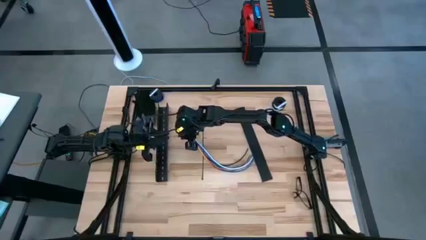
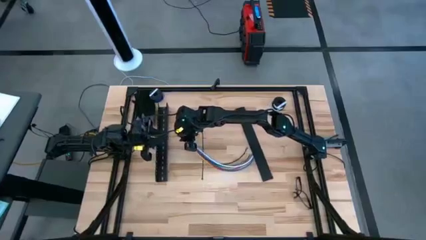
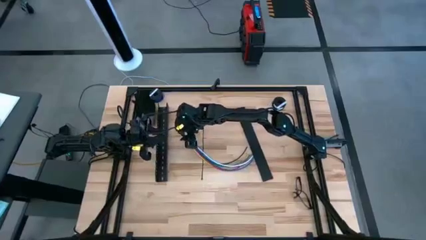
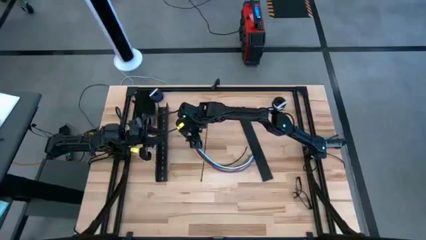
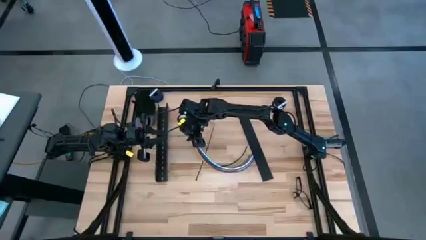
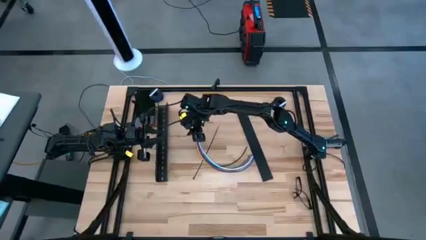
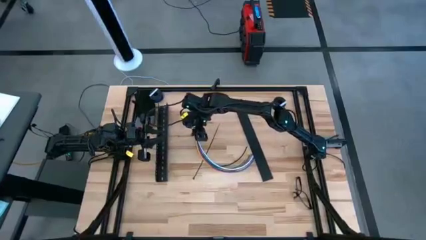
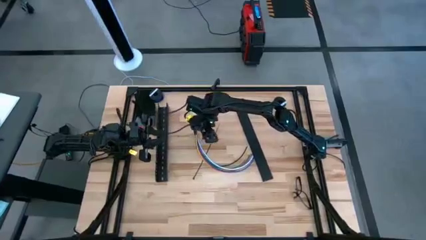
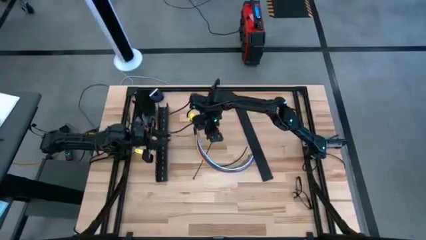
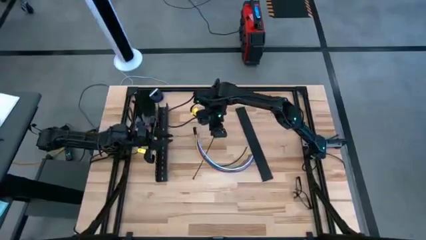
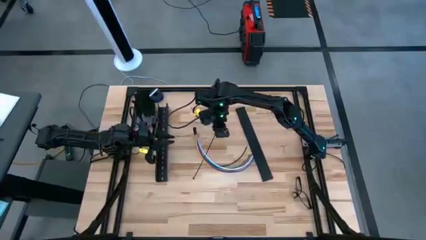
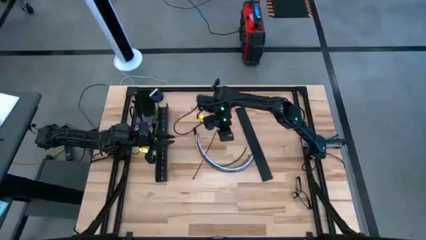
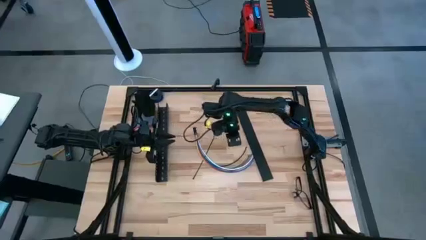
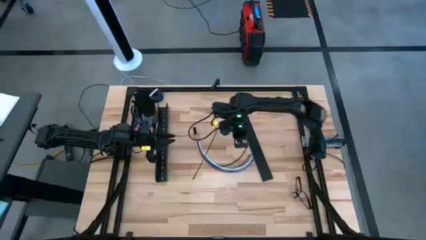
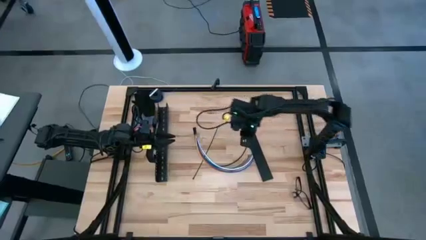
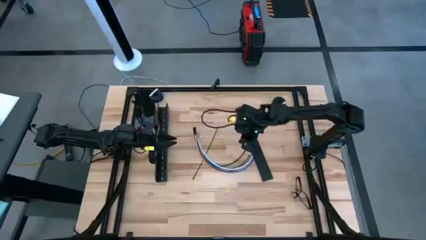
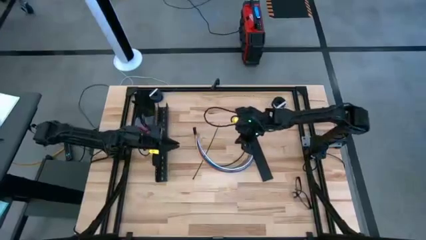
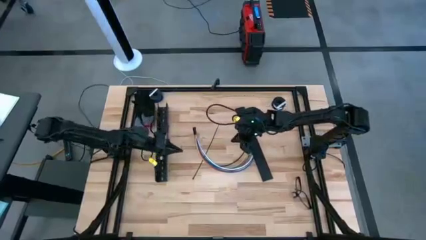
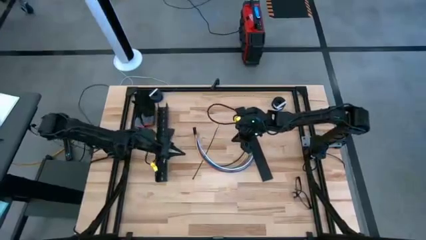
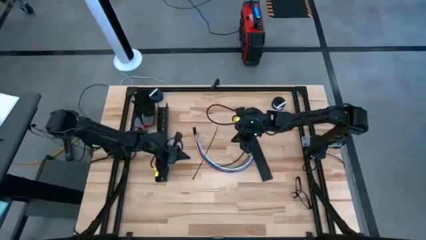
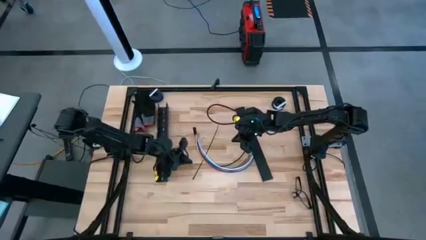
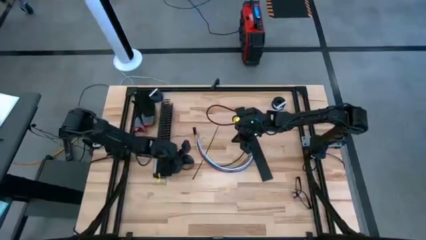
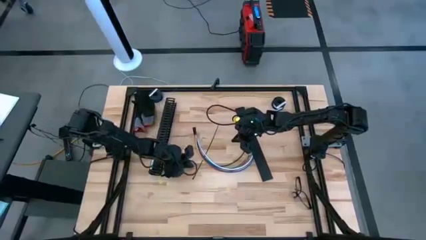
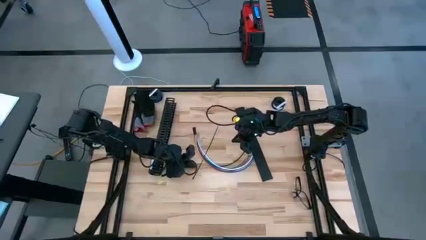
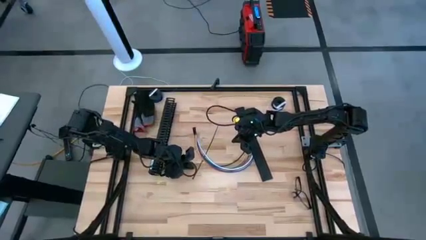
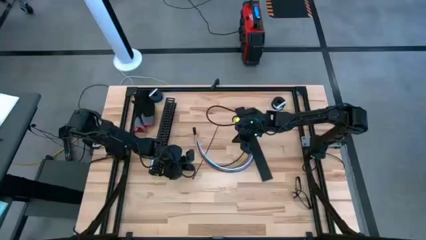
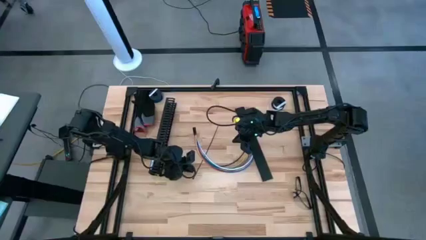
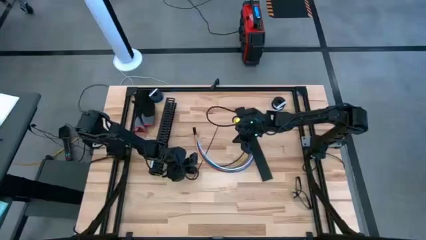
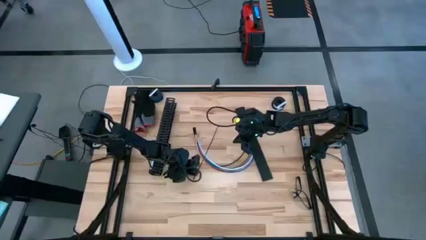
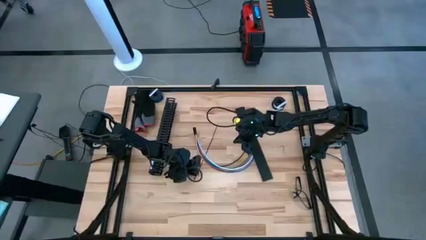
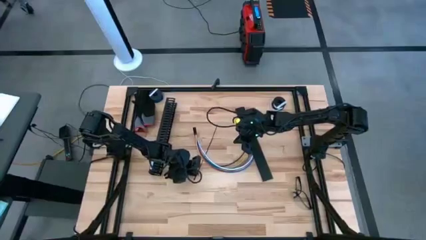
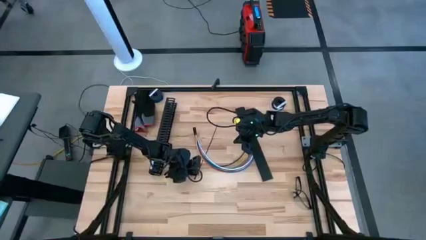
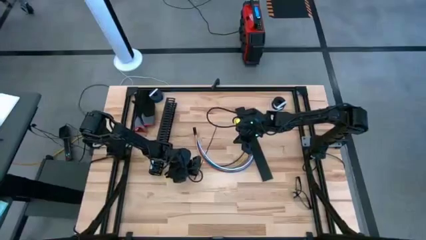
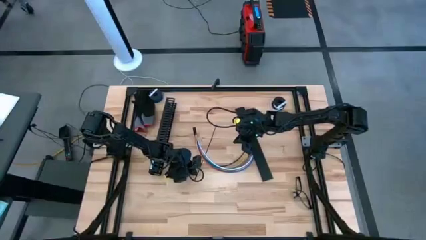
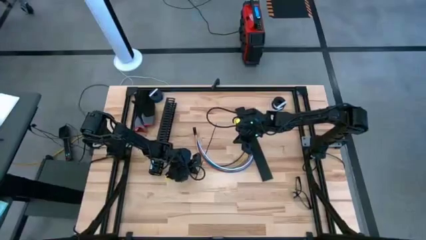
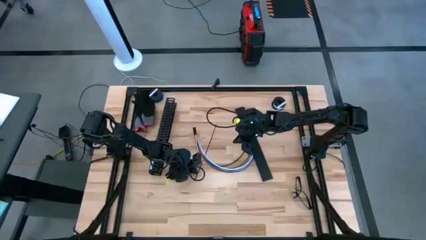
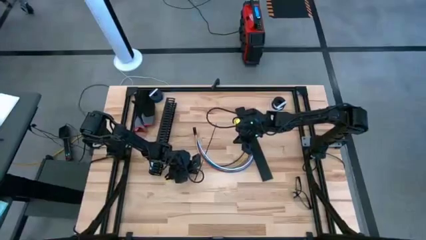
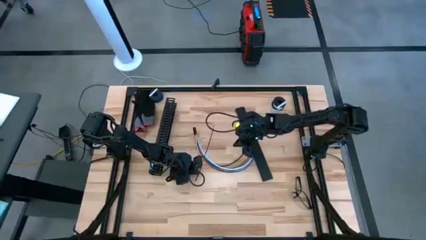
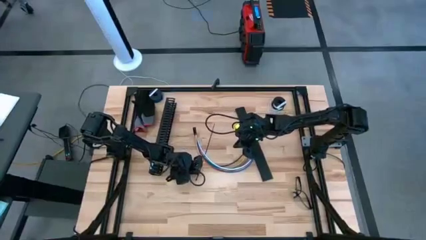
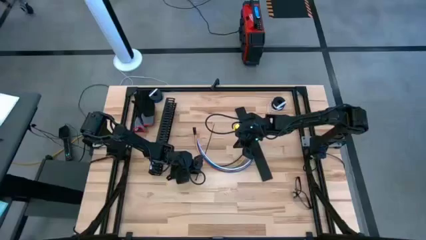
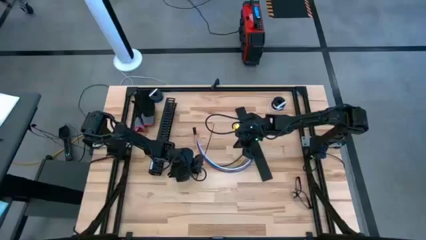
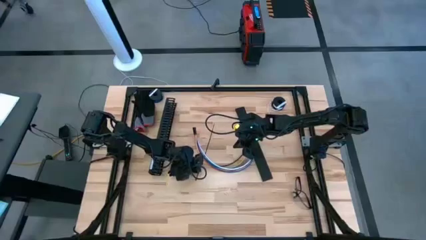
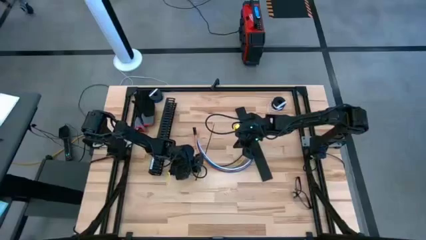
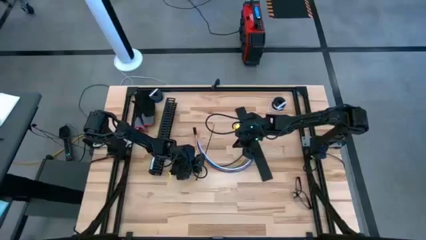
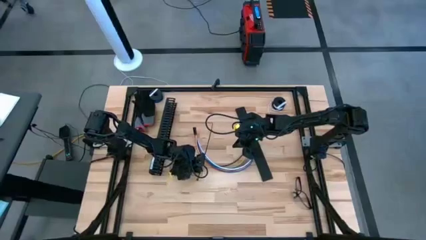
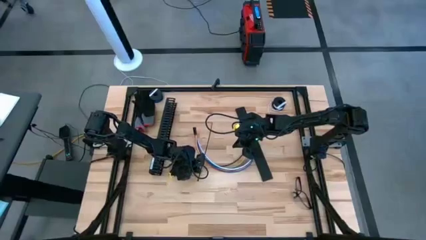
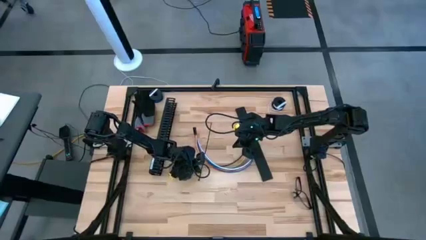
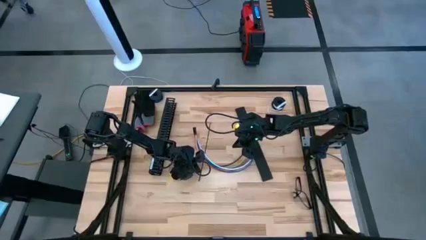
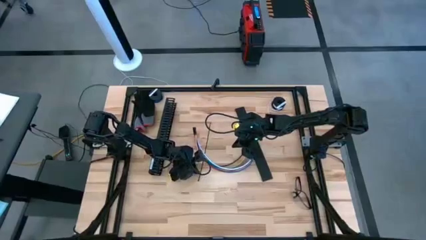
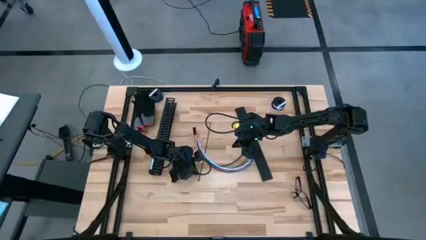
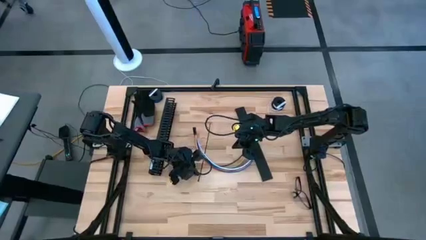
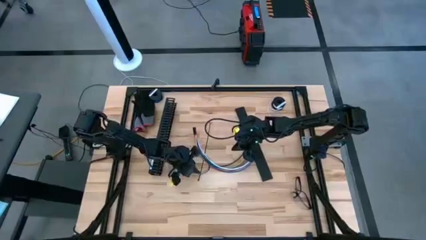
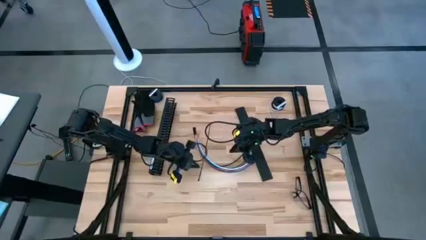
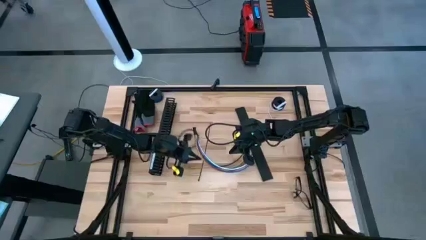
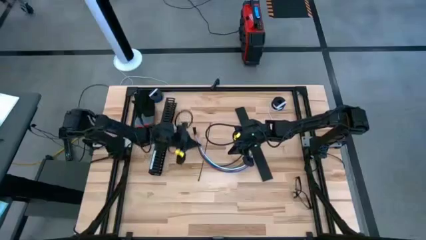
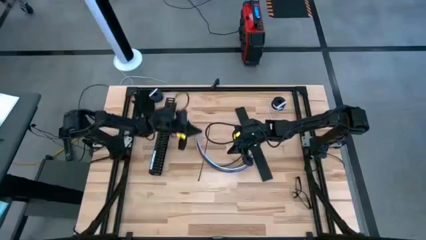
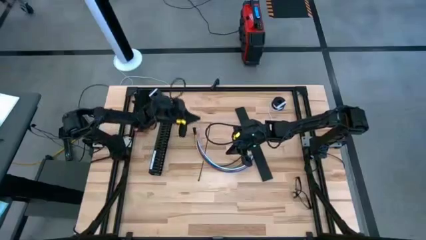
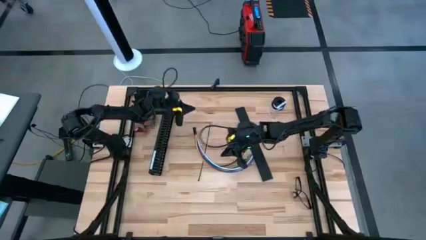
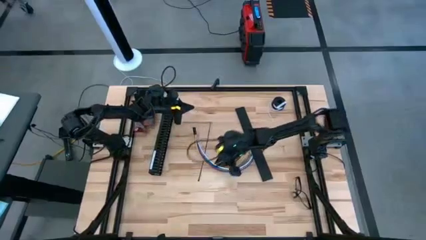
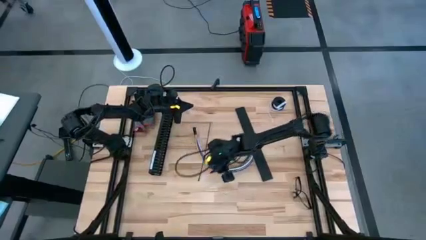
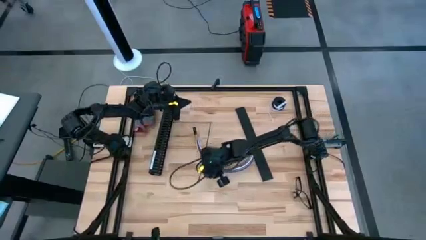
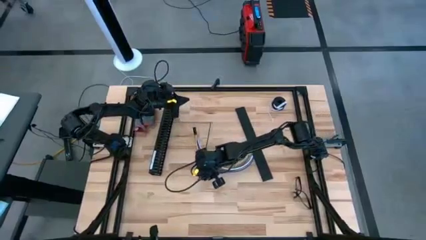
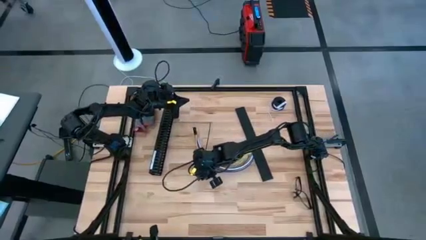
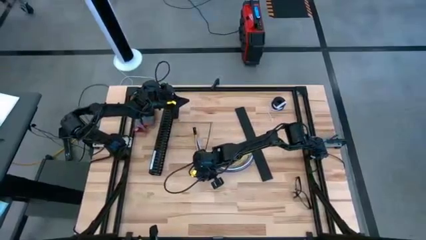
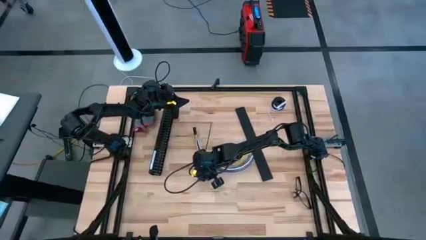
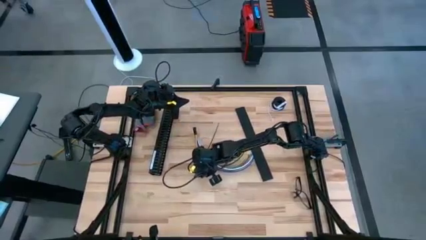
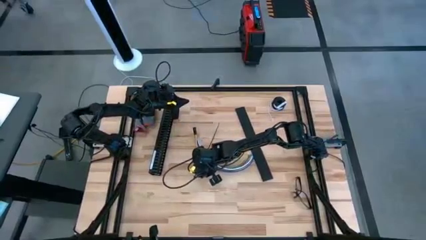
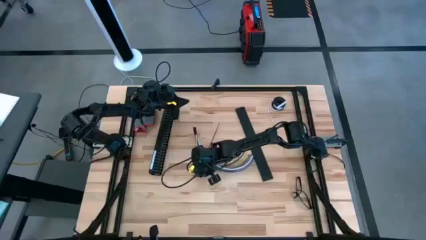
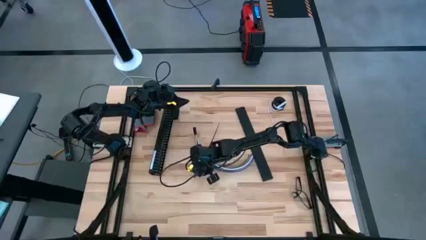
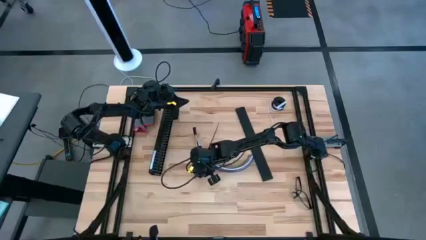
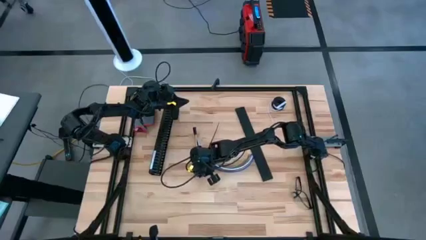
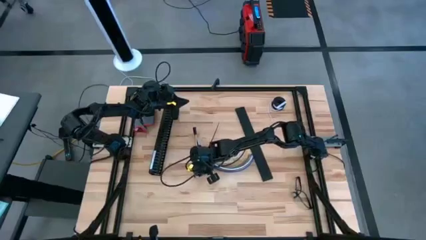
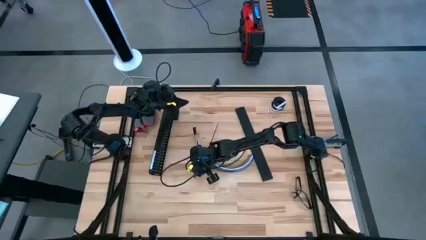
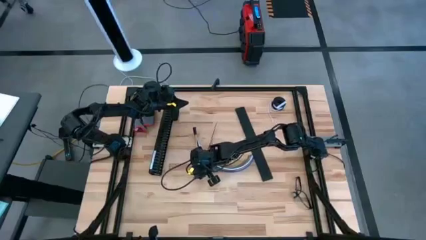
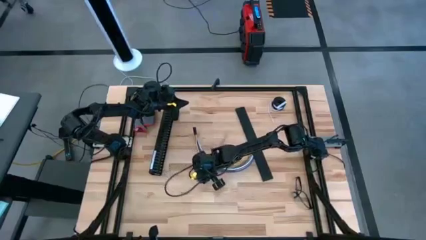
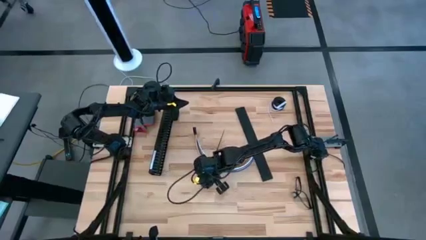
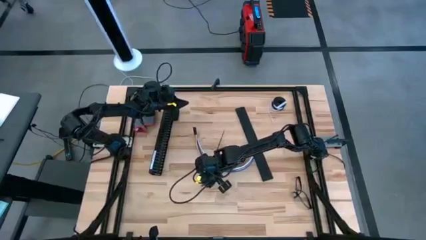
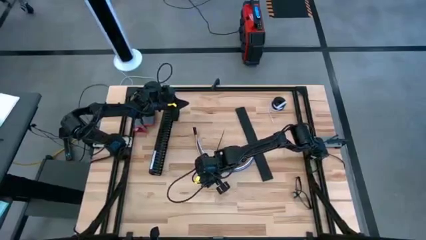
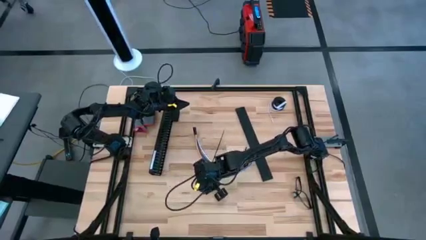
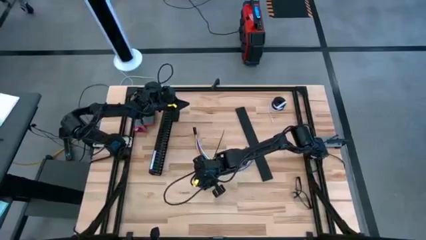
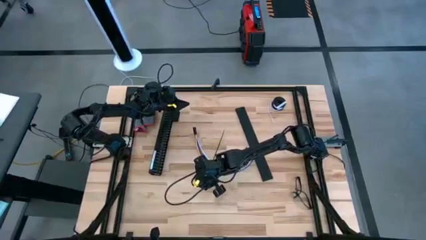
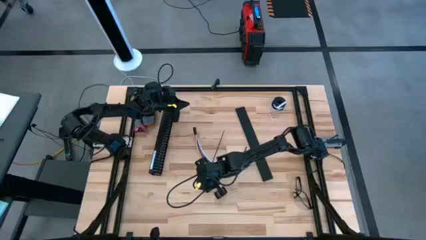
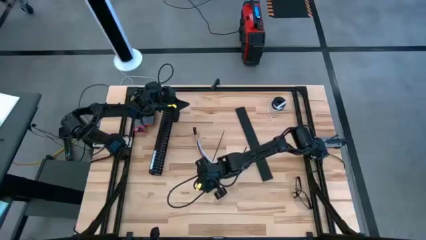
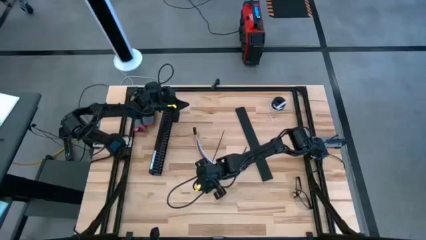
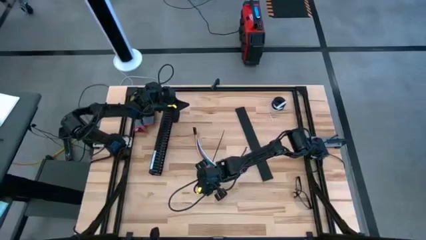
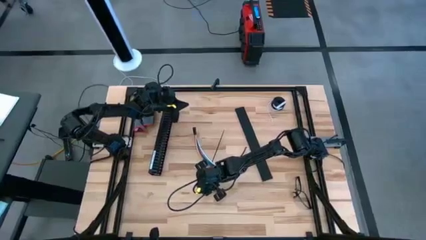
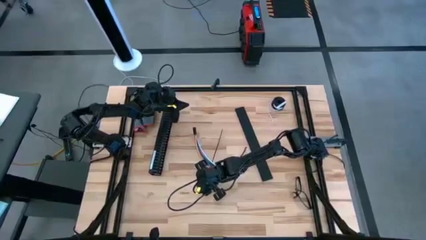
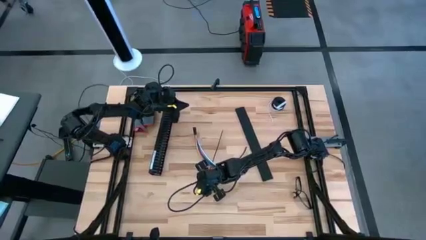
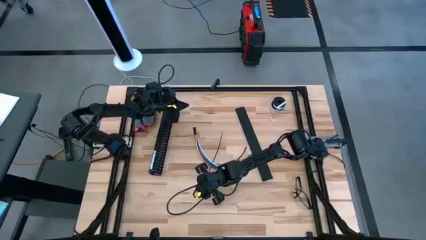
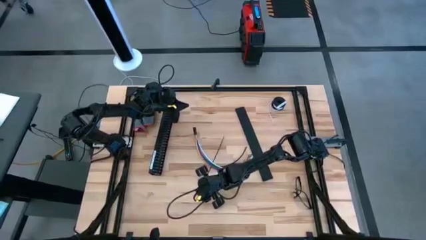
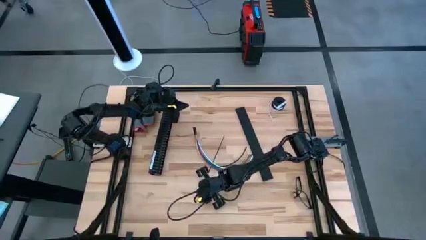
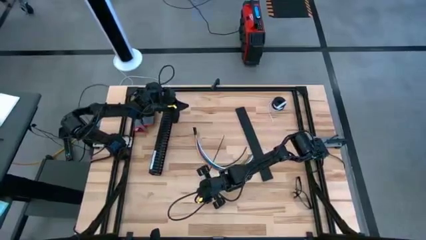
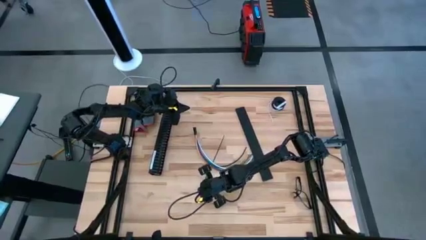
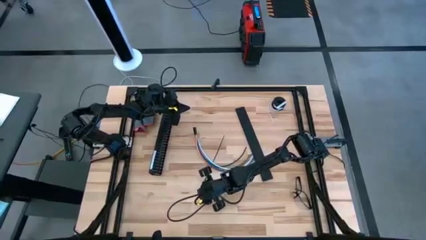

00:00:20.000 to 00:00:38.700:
Task: Ziptie cables
Wrap the black zip tie on the cable
